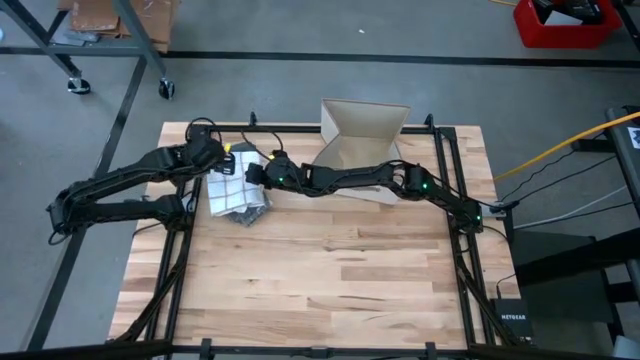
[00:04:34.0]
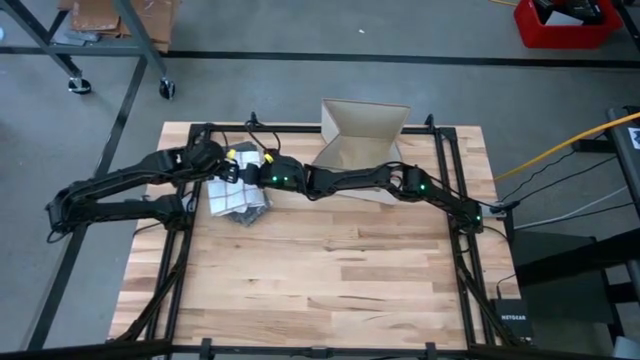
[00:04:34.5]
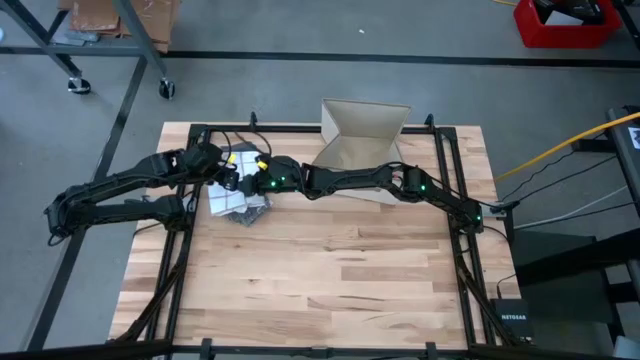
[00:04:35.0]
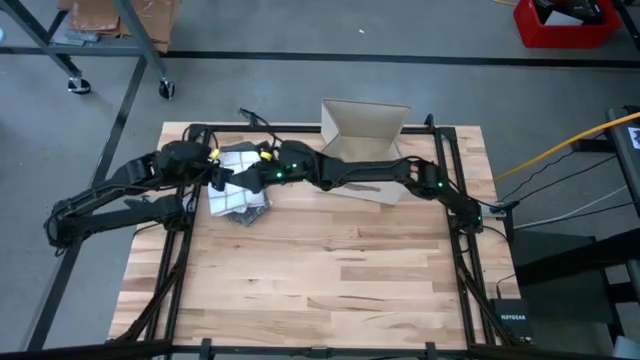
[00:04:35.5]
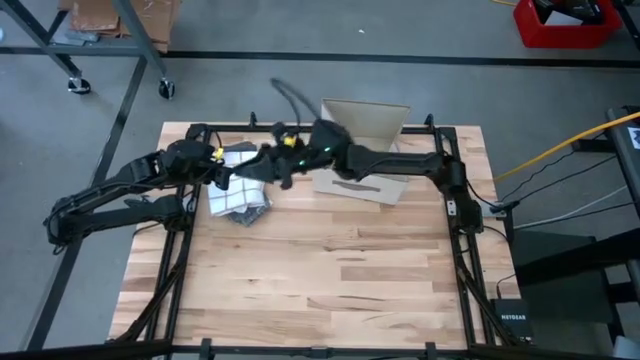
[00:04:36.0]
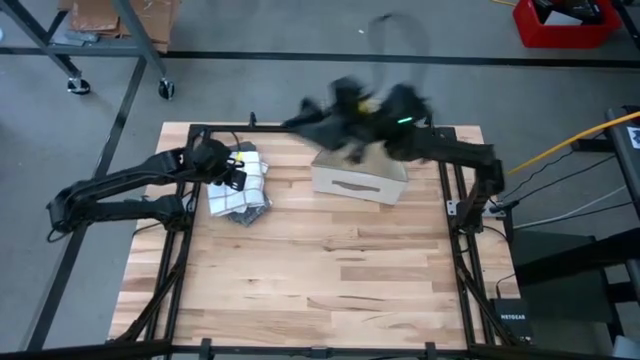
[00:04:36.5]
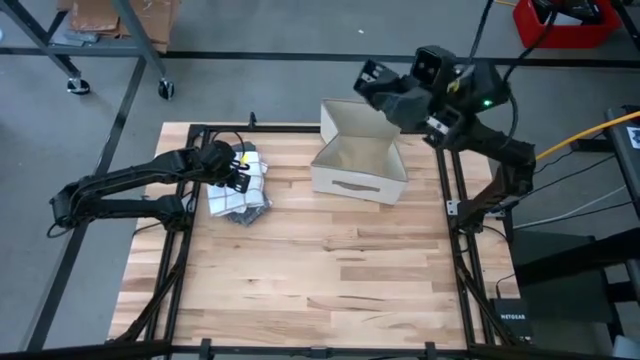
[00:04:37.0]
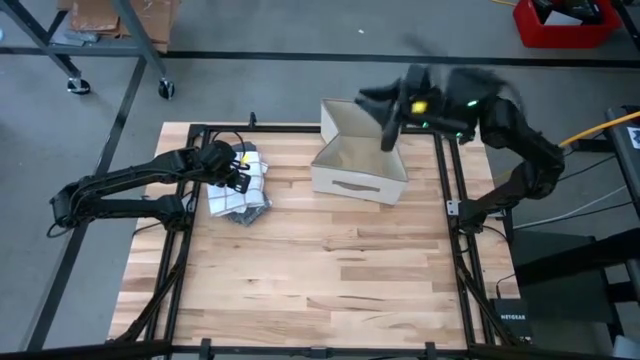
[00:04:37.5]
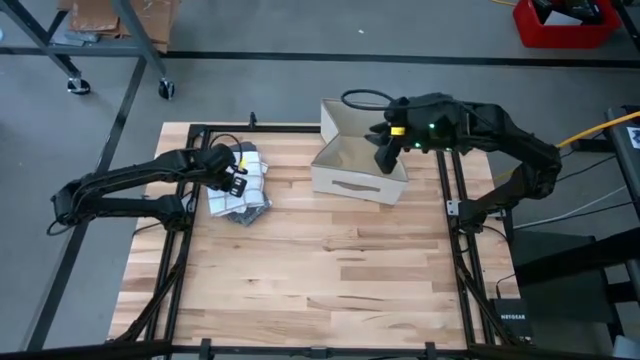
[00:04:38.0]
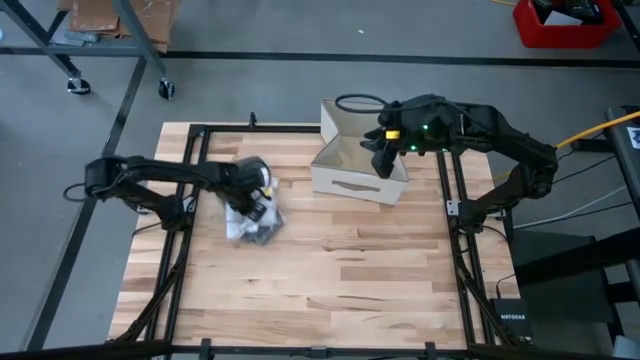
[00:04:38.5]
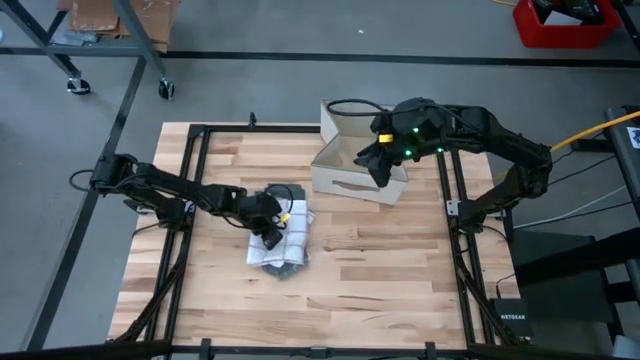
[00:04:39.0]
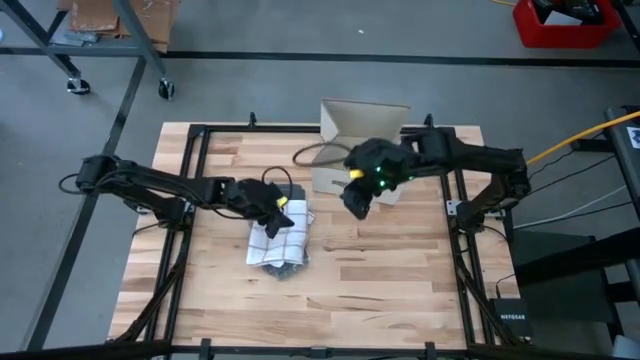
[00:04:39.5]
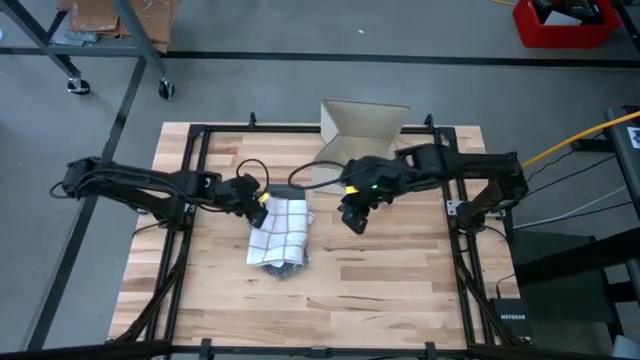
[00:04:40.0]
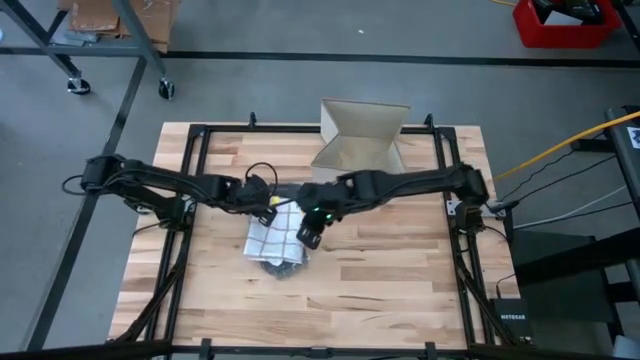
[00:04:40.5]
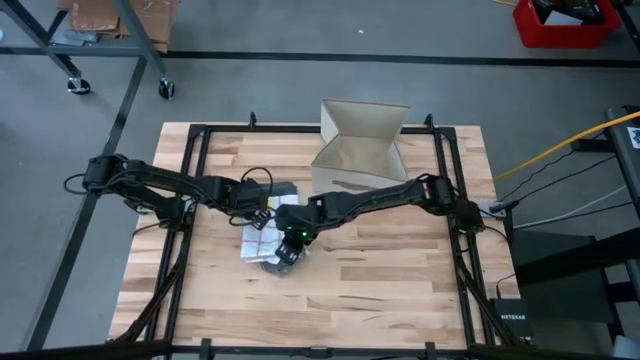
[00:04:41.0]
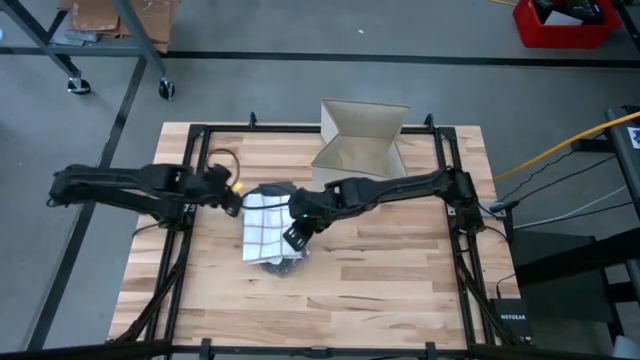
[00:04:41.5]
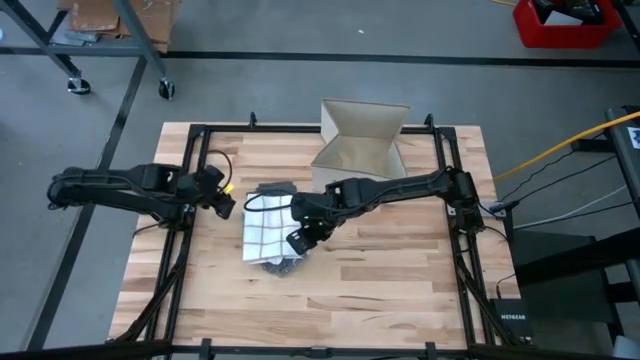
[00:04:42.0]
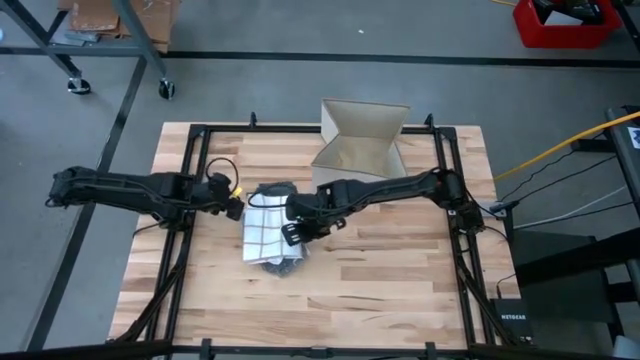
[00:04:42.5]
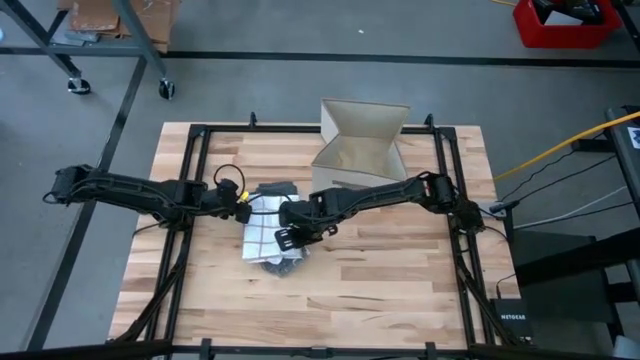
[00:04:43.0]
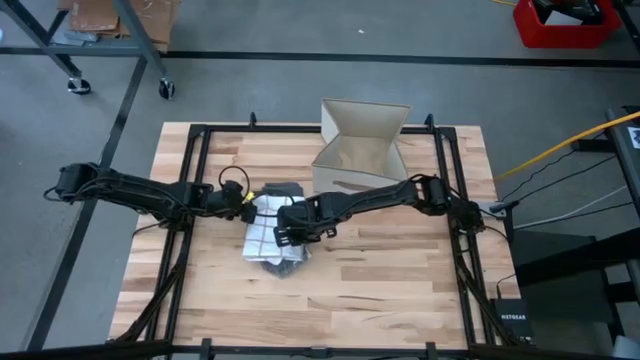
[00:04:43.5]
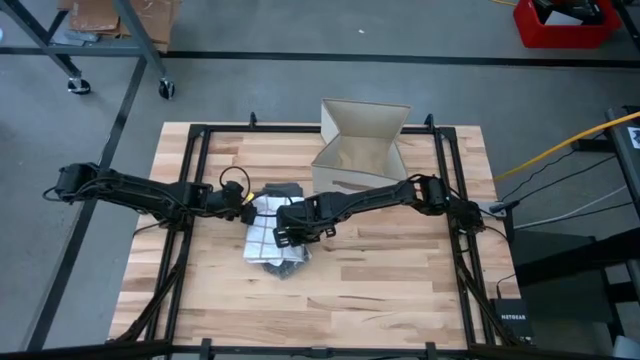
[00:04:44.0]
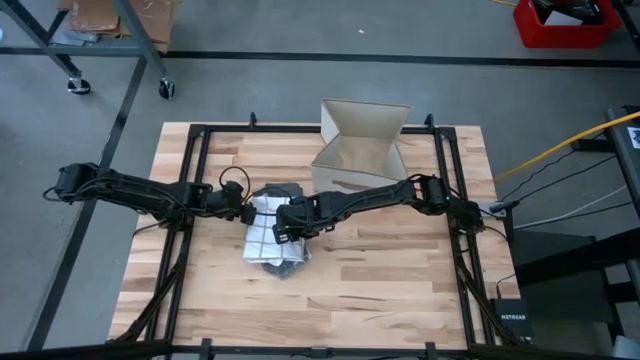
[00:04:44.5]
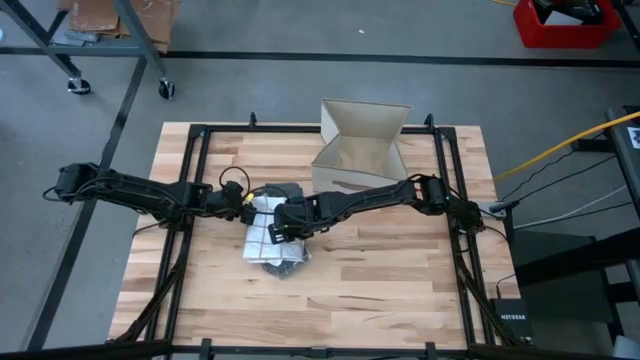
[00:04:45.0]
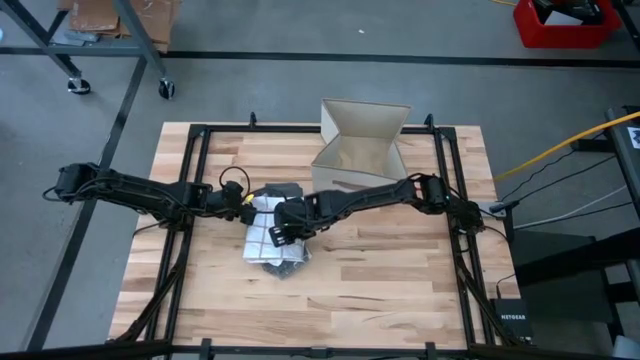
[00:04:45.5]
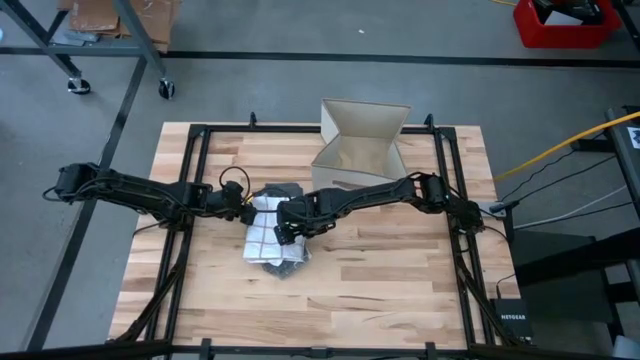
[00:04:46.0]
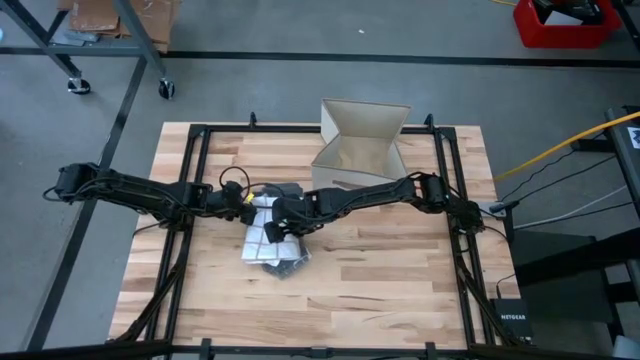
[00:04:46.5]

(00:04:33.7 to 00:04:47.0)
Task: Fold towel
Put the stacked towels into the white laundry organizer
